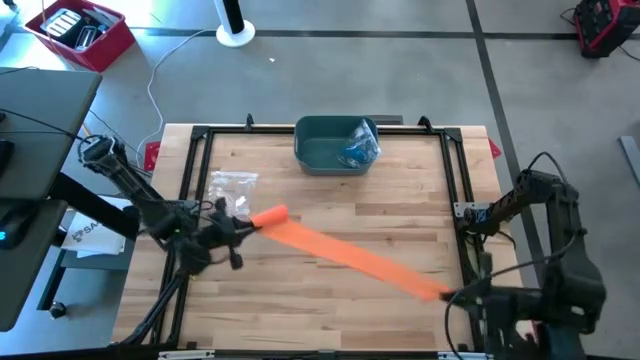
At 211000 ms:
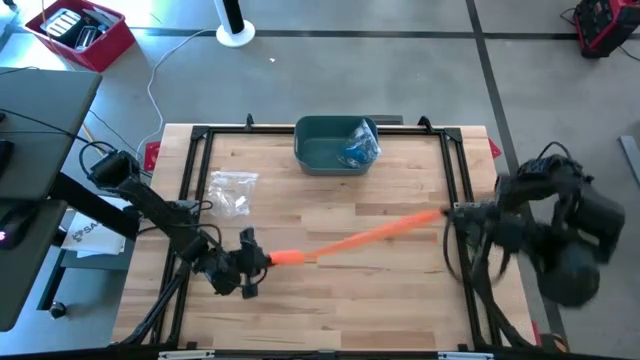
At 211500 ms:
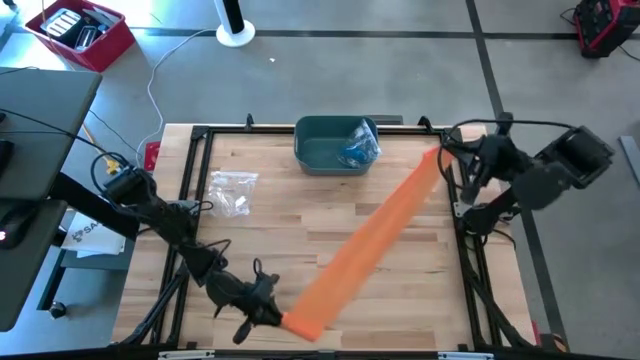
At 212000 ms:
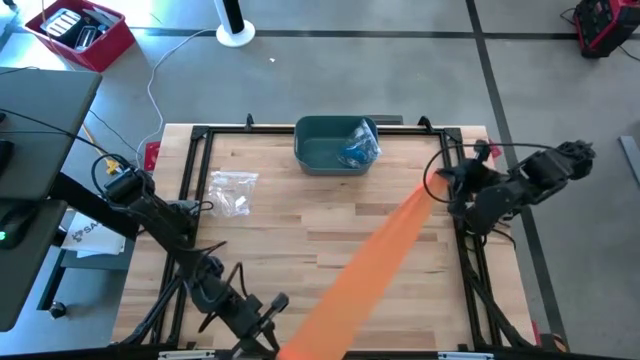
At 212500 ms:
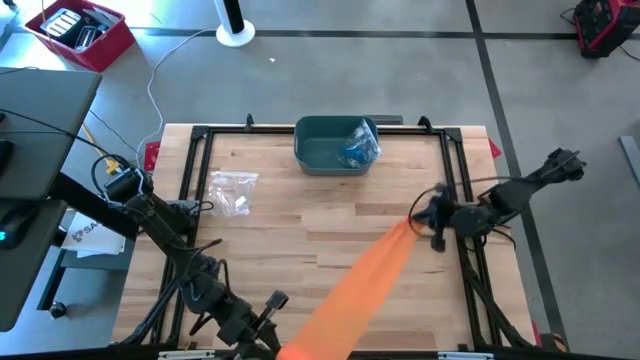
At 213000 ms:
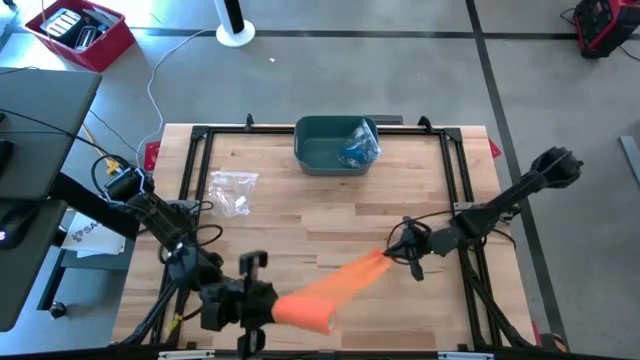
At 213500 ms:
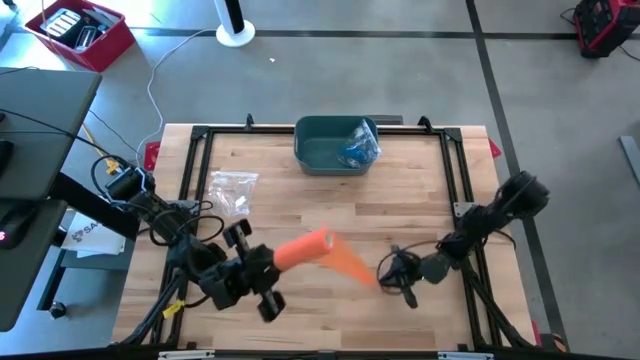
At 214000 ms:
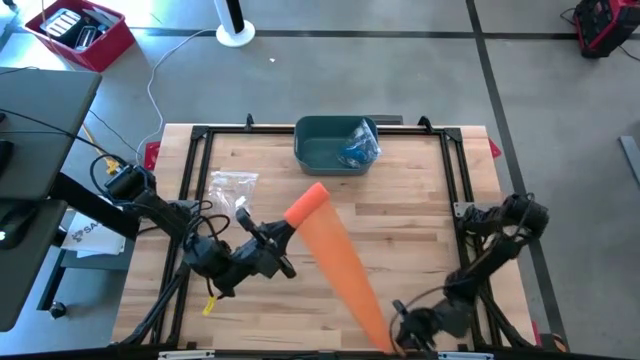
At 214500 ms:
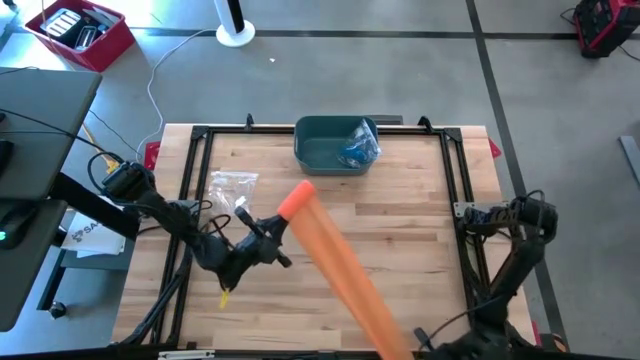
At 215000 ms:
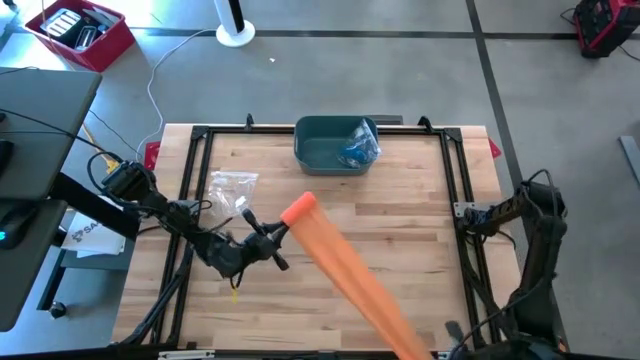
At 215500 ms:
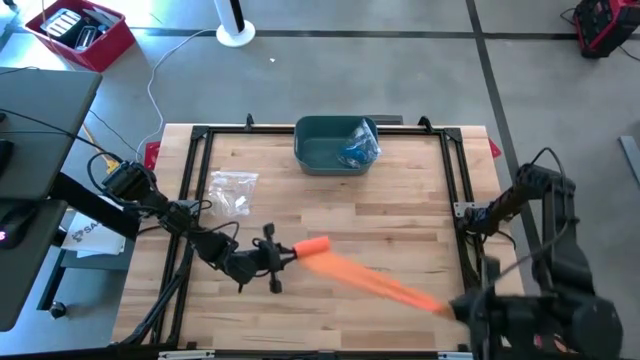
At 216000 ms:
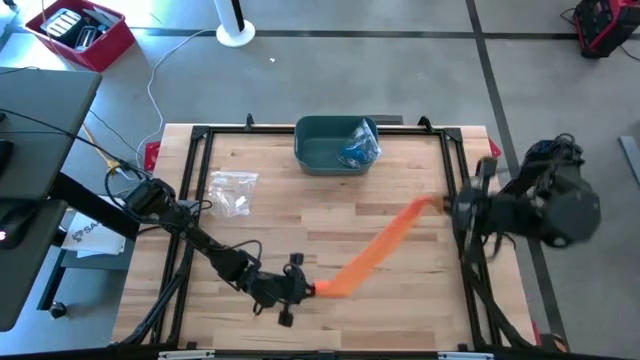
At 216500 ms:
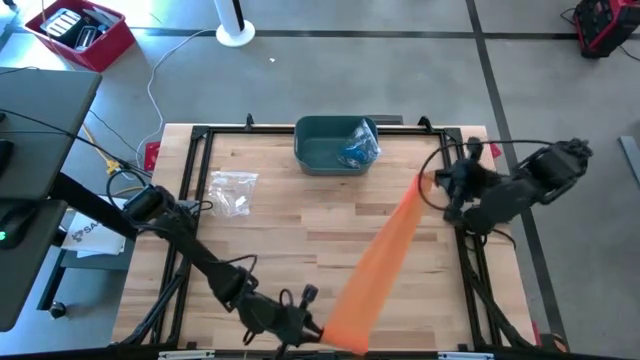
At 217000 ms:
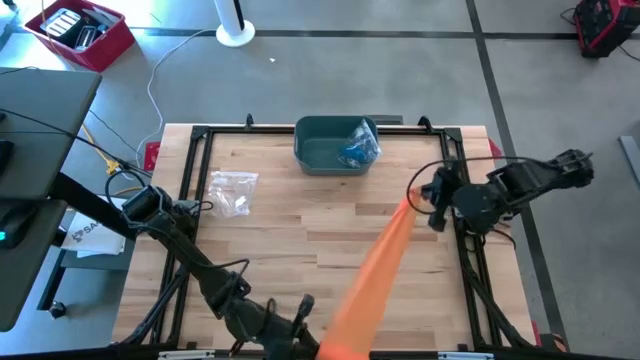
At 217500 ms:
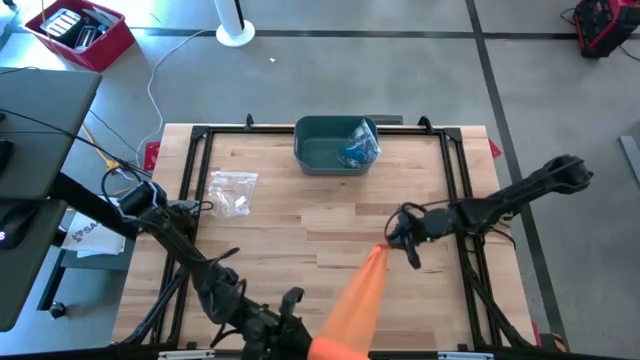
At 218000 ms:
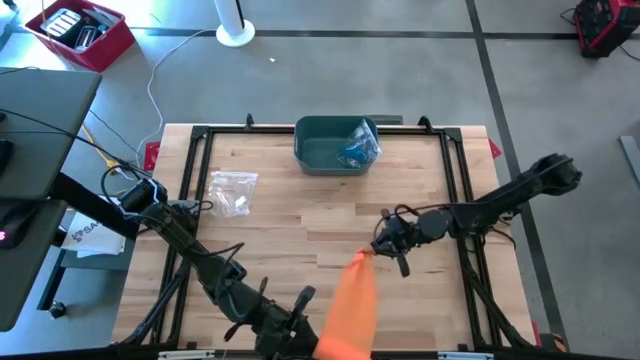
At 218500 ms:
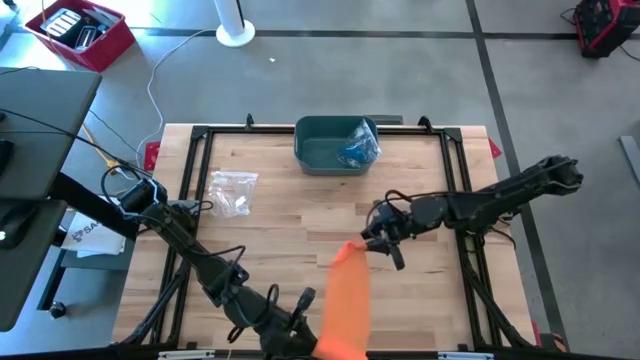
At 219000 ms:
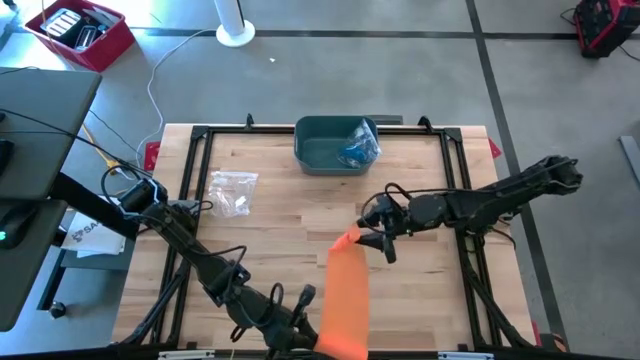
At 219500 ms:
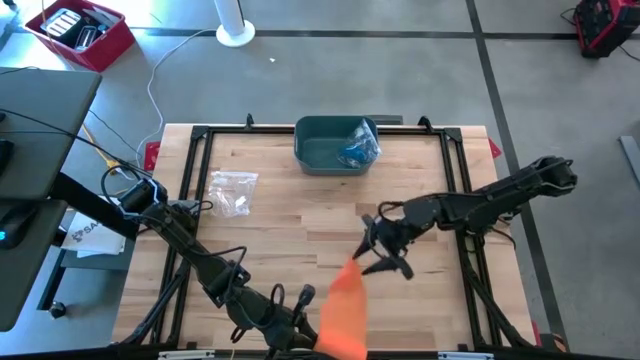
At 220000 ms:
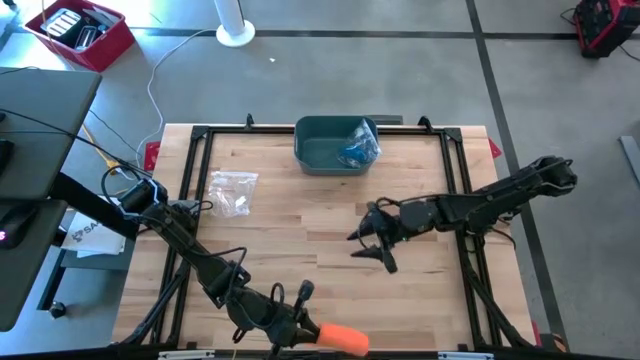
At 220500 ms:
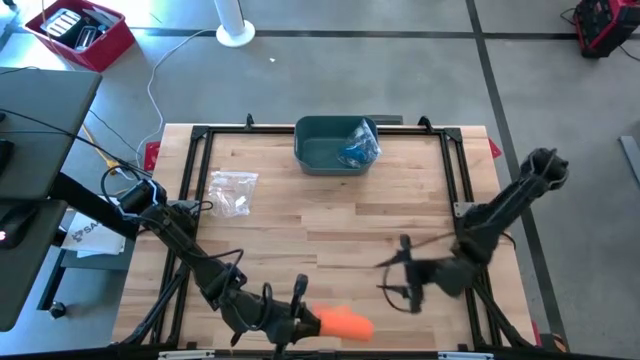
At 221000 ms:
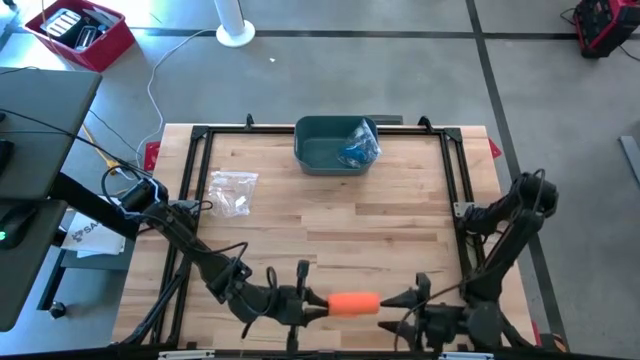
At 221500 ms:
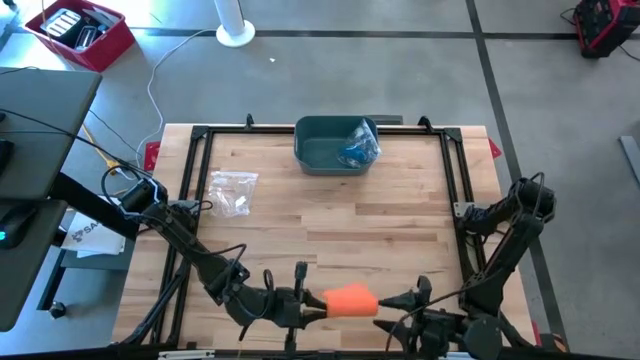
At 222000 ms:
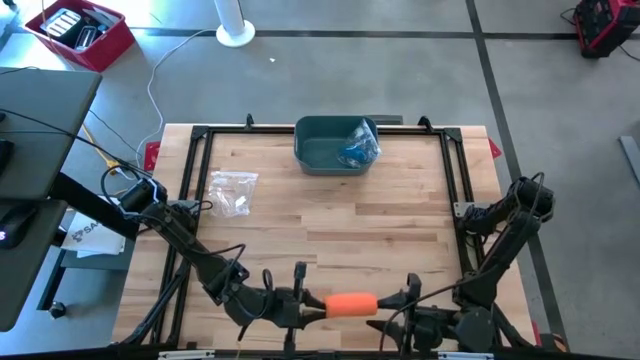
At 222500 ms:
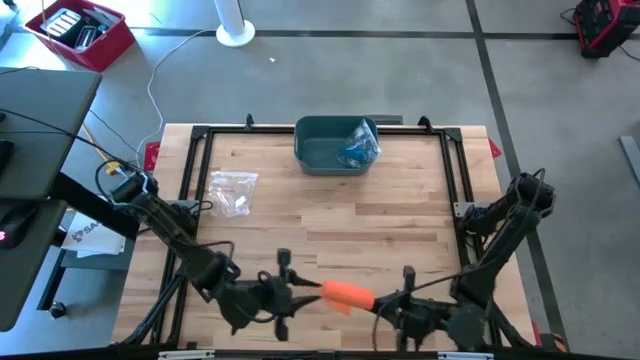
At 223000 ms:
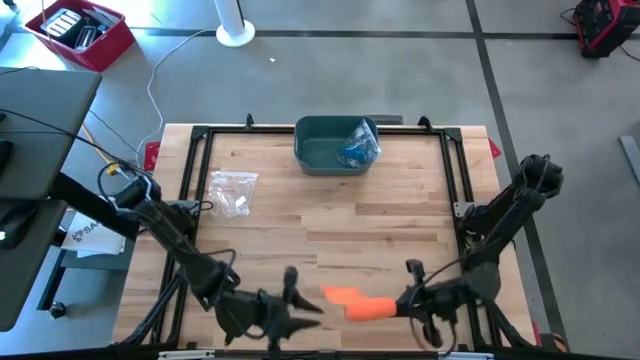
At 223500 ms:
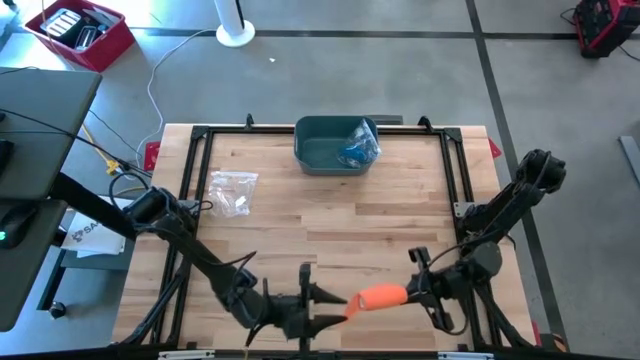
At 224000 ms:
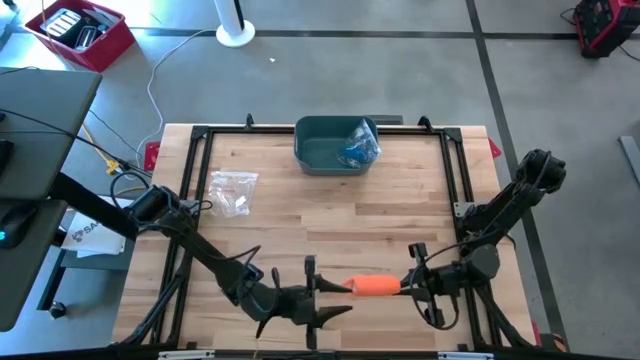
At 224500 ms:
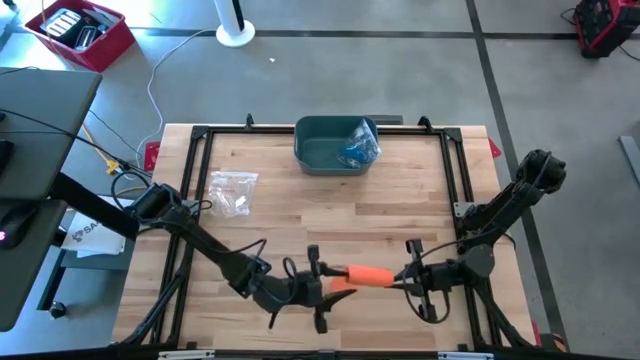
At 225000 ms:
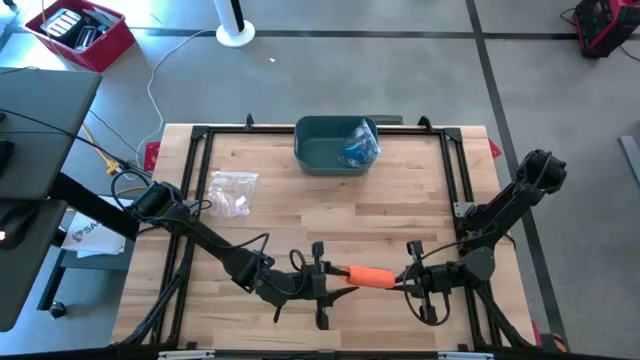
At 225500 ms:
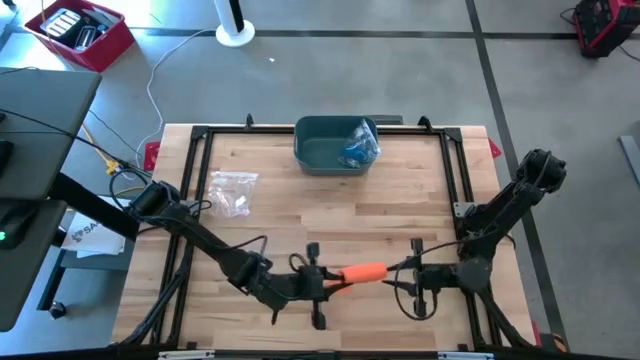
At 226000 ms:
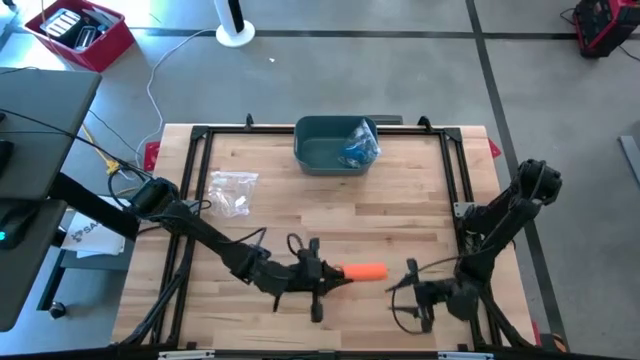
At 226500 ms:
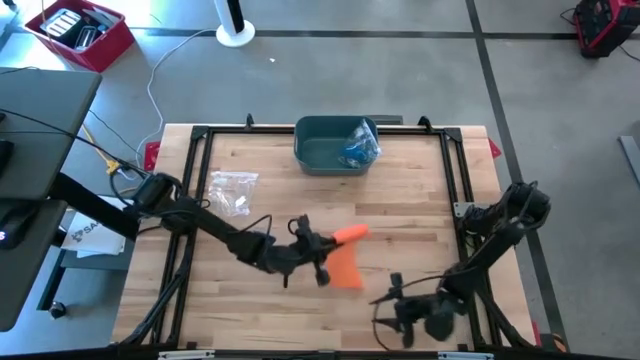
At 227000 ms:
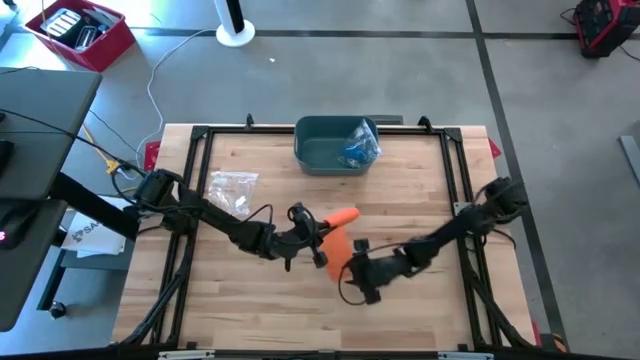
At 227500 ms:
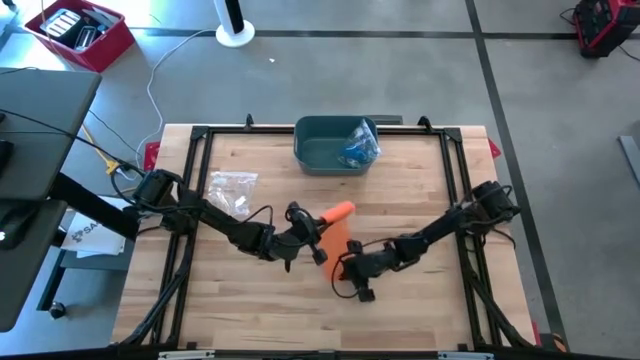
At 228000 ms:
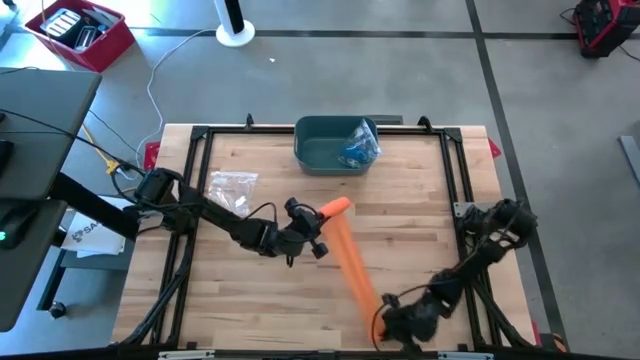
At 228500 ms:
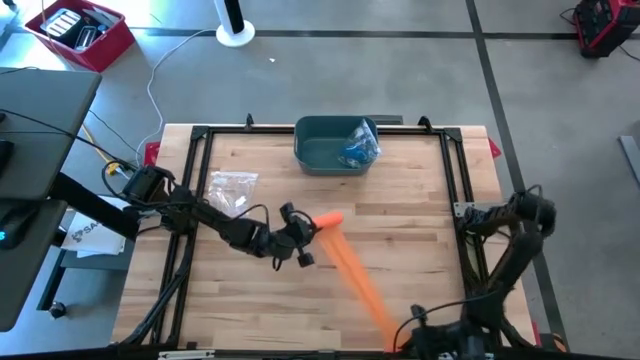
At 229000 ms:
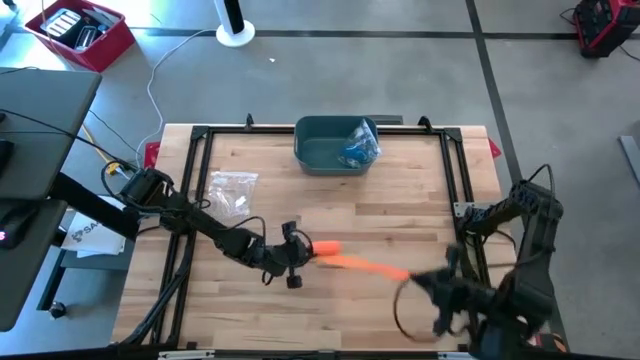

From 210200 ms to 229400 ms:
Task: Roll bandage
Roll the orange bandage
